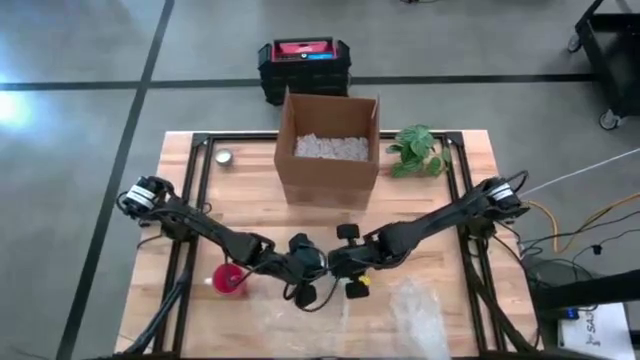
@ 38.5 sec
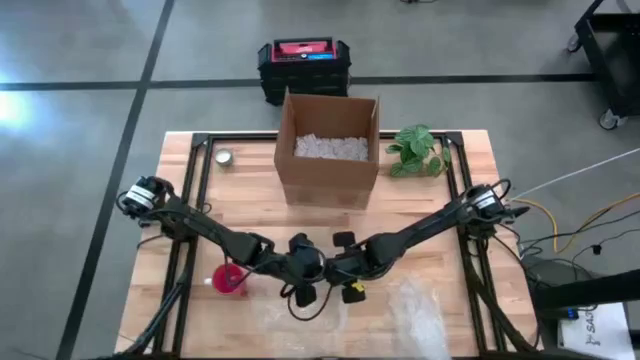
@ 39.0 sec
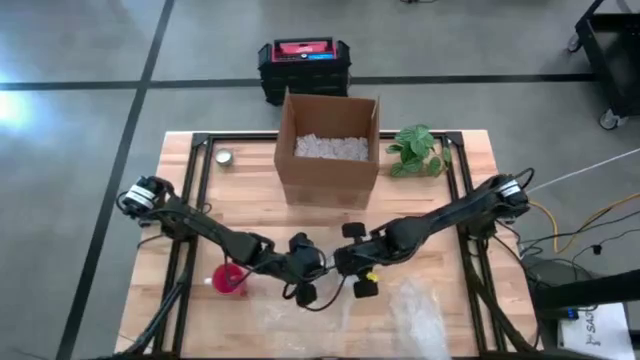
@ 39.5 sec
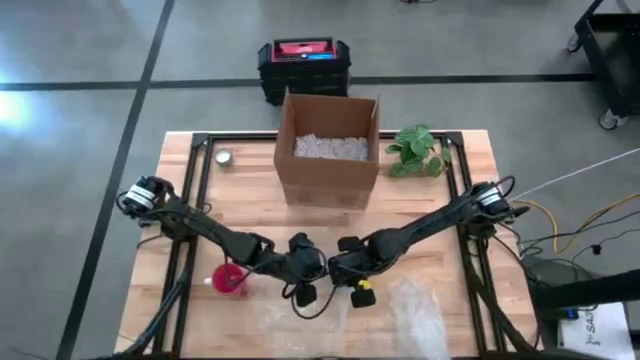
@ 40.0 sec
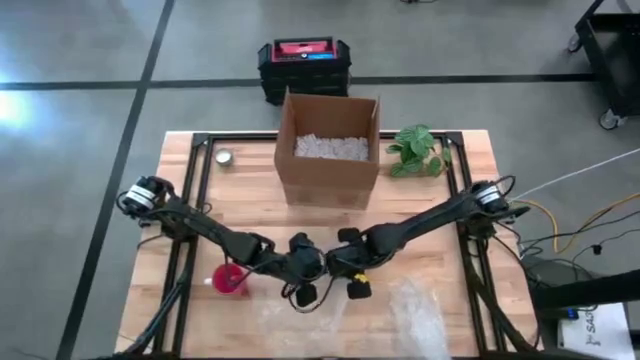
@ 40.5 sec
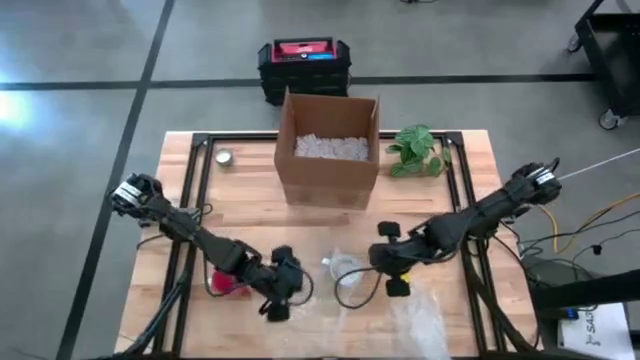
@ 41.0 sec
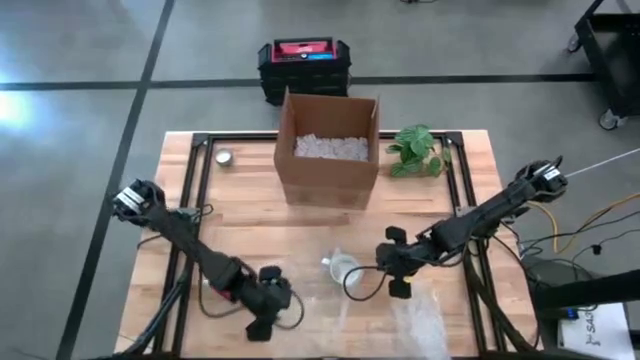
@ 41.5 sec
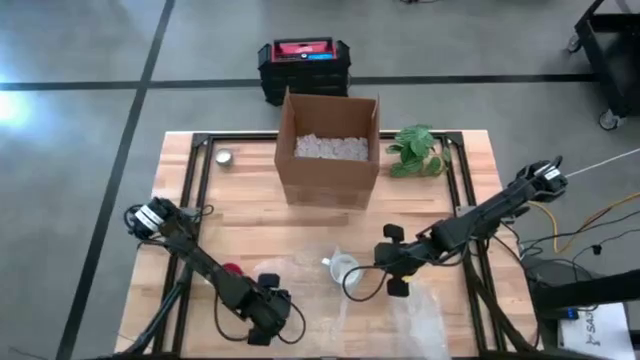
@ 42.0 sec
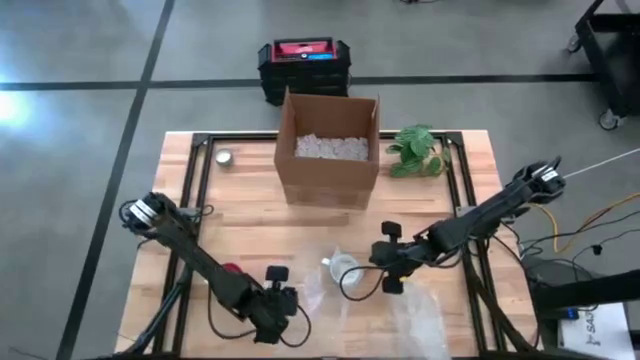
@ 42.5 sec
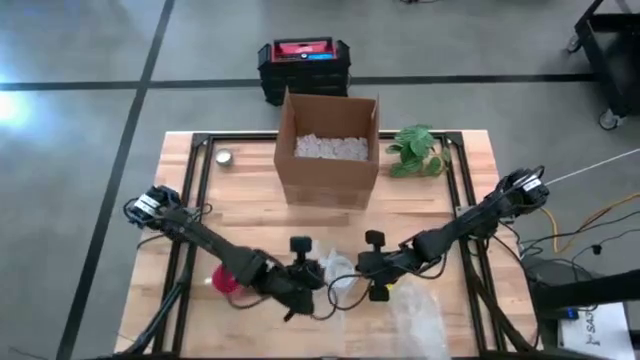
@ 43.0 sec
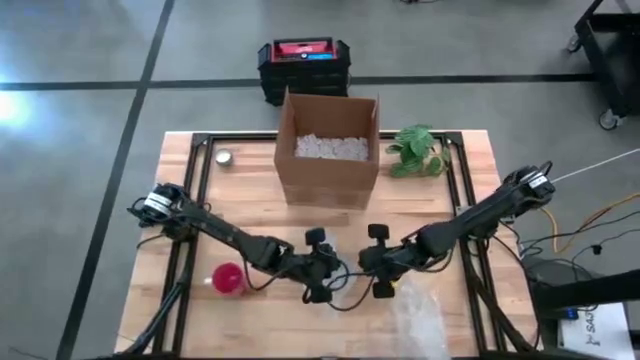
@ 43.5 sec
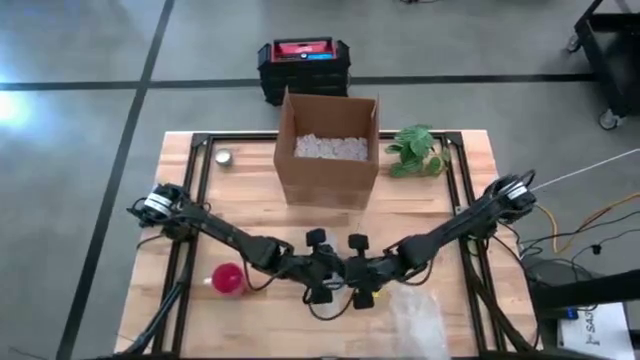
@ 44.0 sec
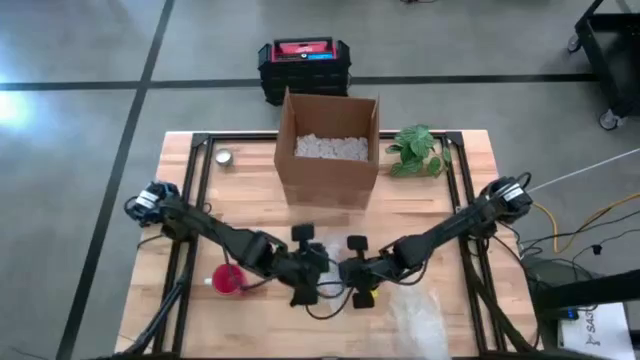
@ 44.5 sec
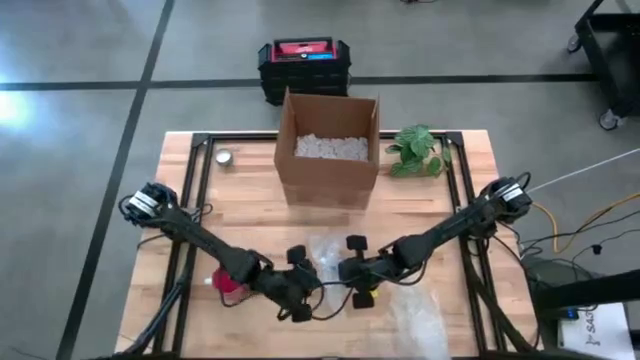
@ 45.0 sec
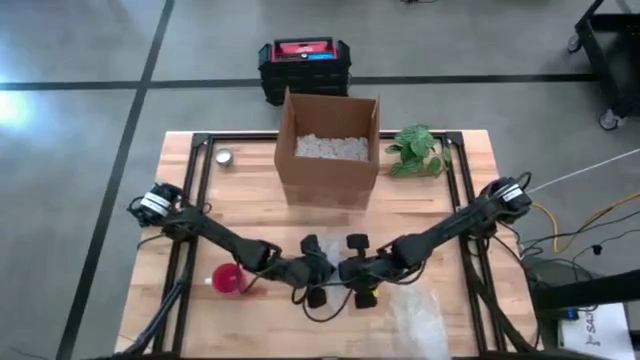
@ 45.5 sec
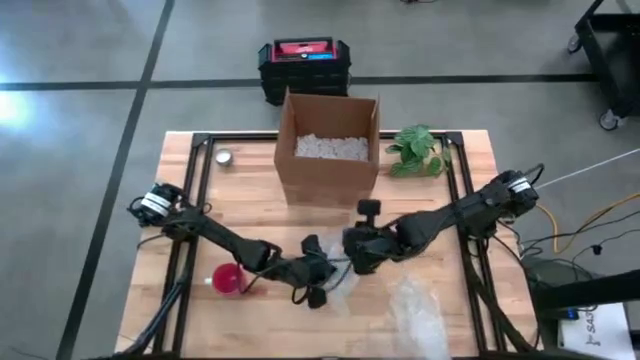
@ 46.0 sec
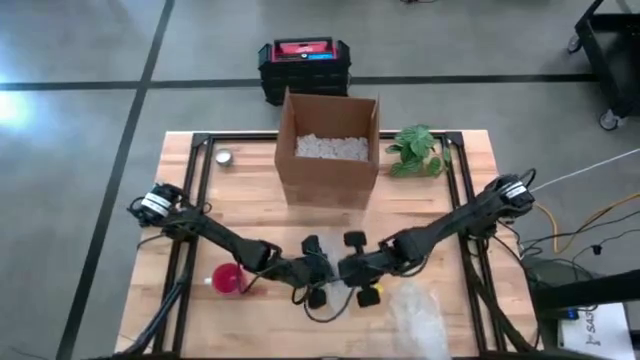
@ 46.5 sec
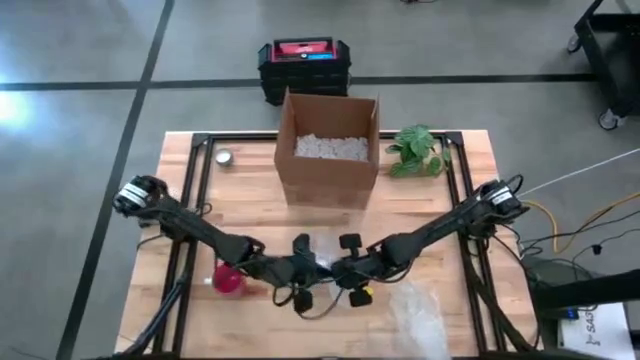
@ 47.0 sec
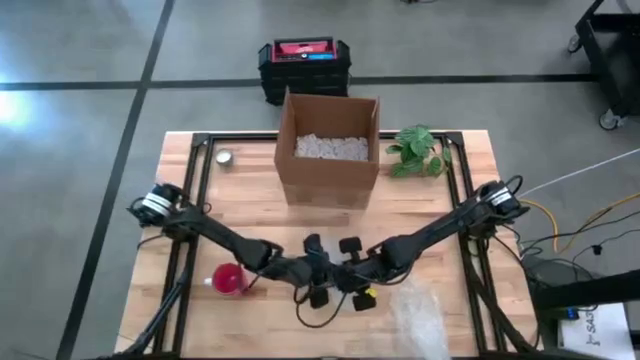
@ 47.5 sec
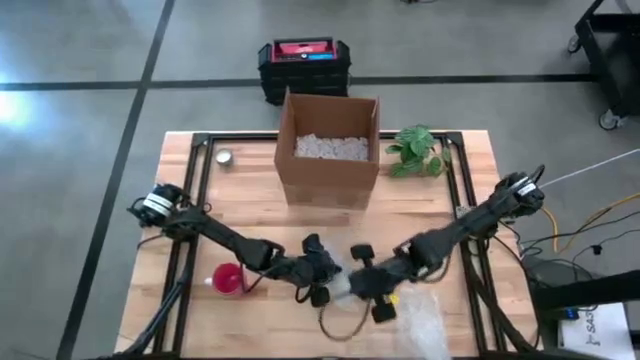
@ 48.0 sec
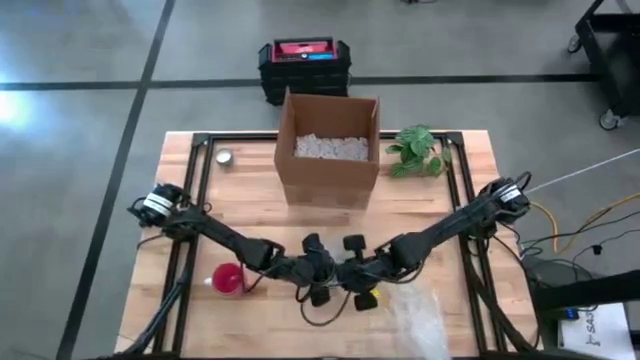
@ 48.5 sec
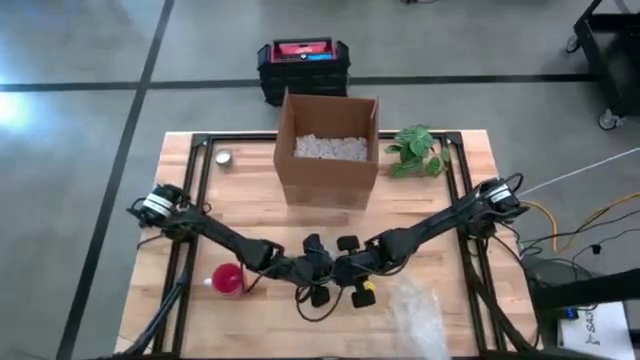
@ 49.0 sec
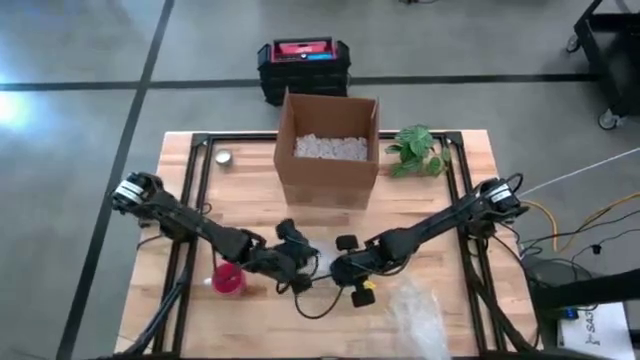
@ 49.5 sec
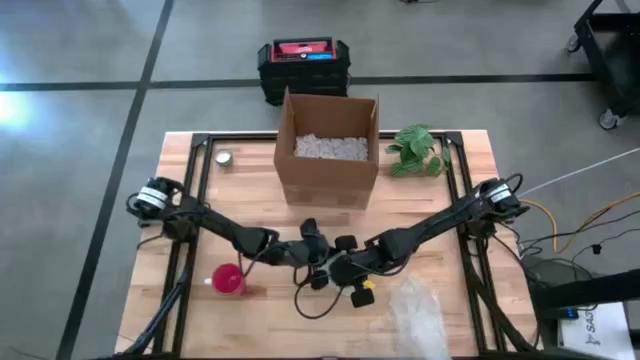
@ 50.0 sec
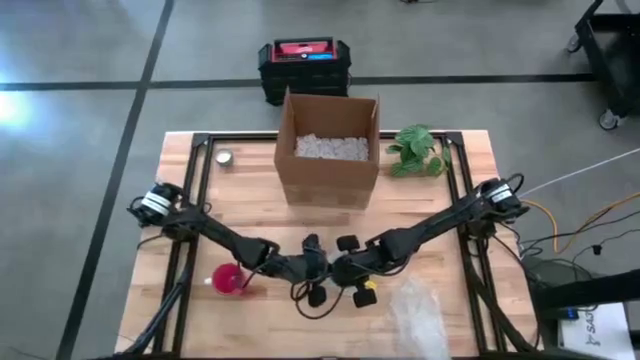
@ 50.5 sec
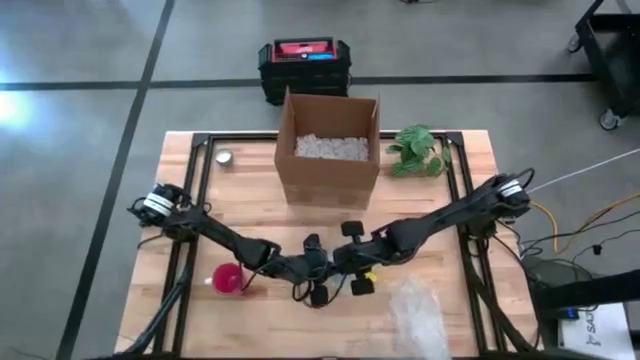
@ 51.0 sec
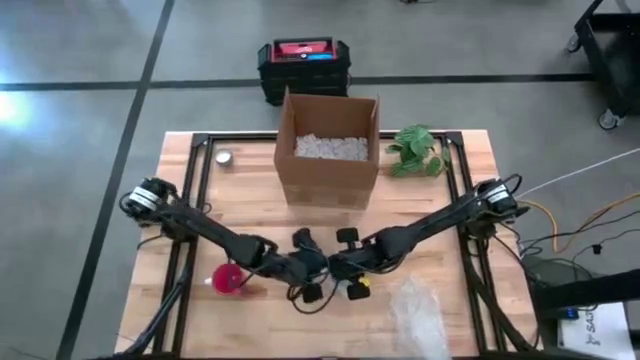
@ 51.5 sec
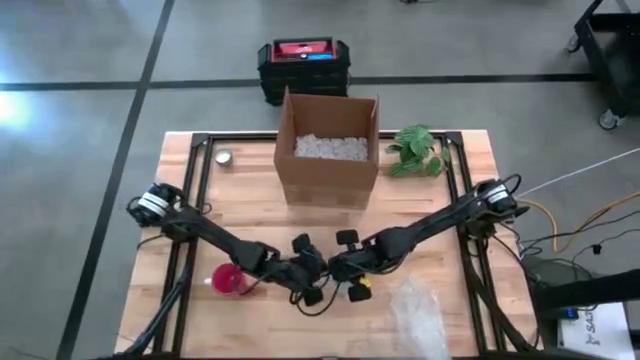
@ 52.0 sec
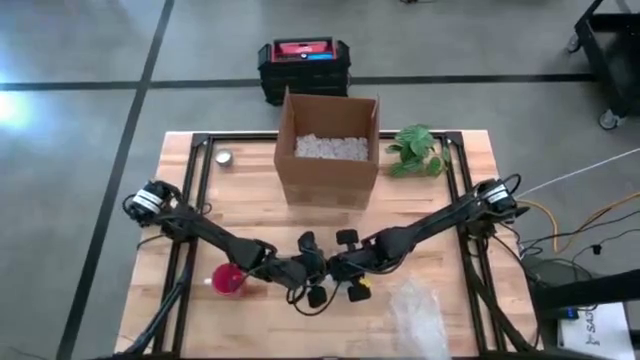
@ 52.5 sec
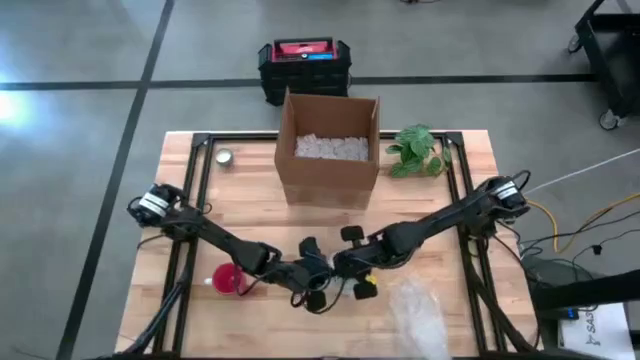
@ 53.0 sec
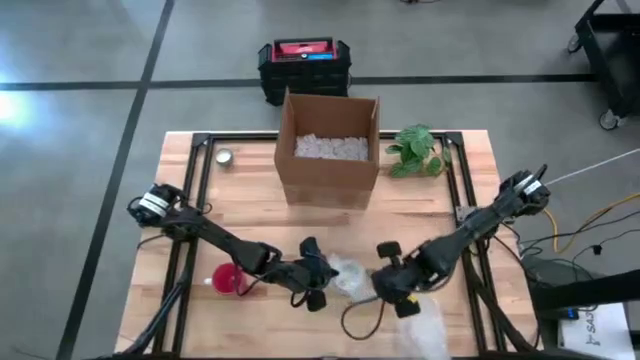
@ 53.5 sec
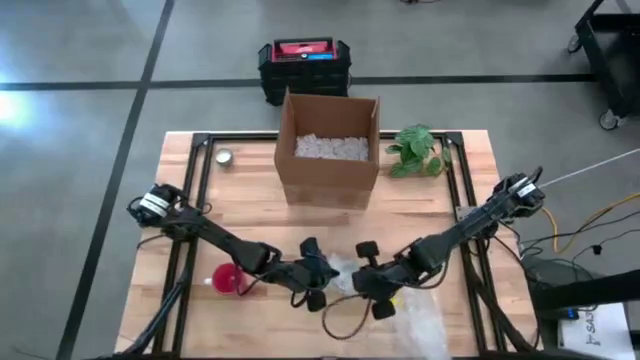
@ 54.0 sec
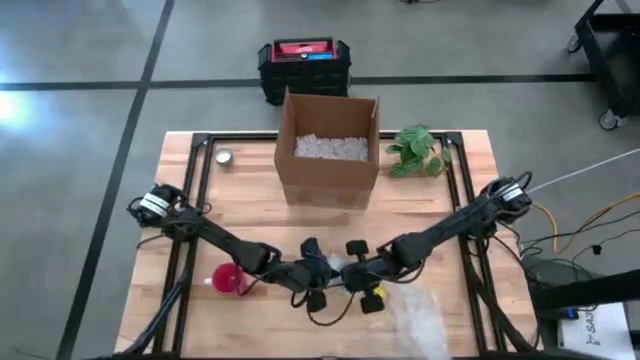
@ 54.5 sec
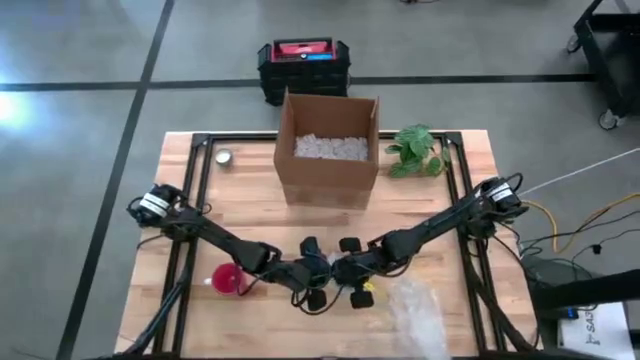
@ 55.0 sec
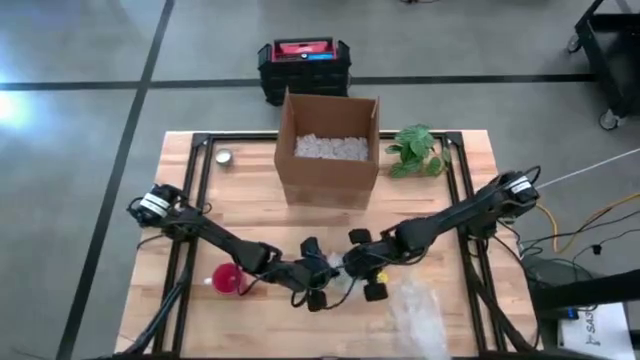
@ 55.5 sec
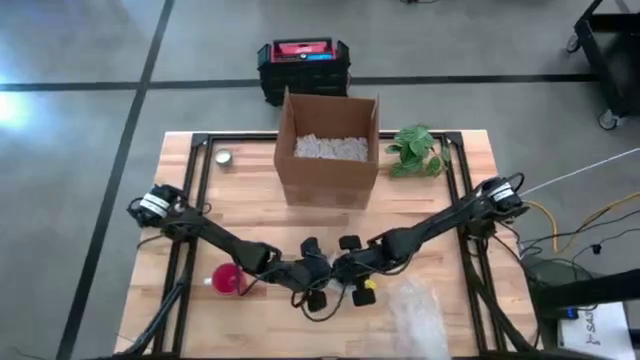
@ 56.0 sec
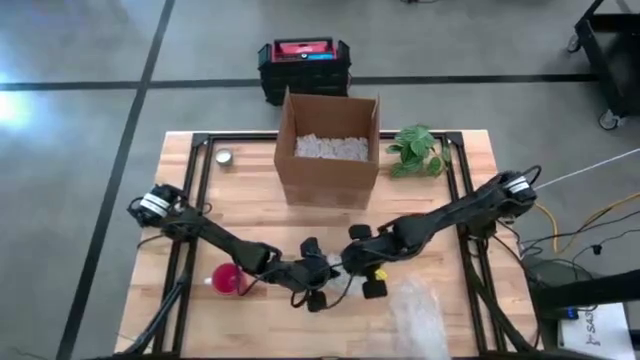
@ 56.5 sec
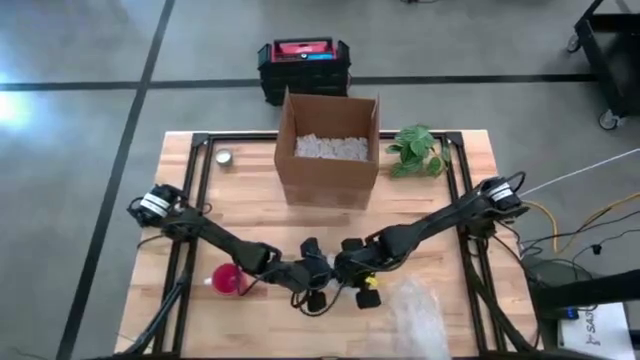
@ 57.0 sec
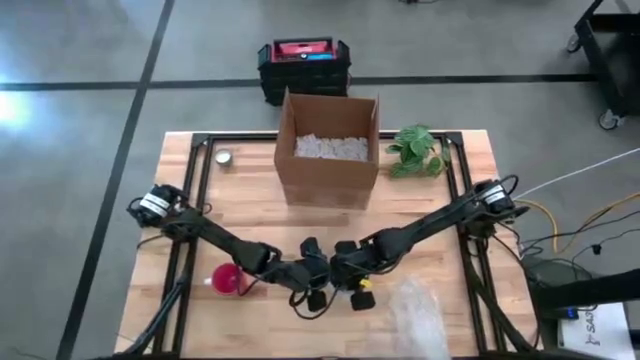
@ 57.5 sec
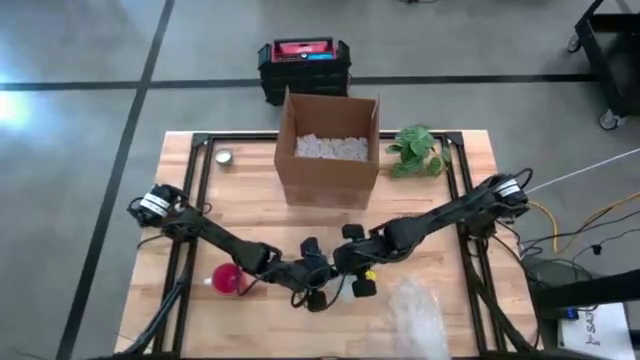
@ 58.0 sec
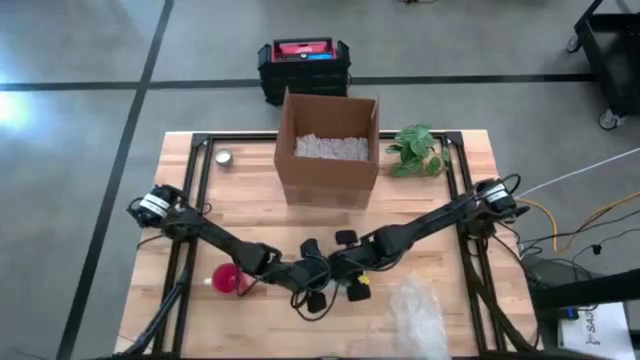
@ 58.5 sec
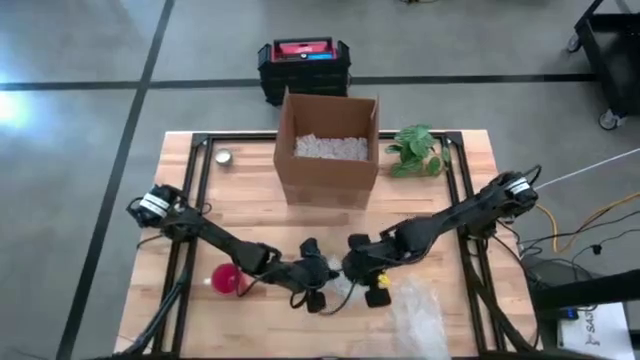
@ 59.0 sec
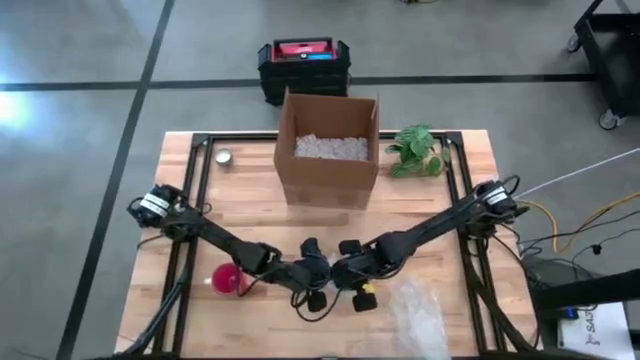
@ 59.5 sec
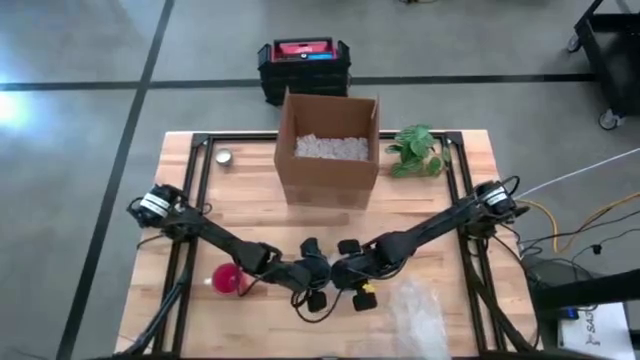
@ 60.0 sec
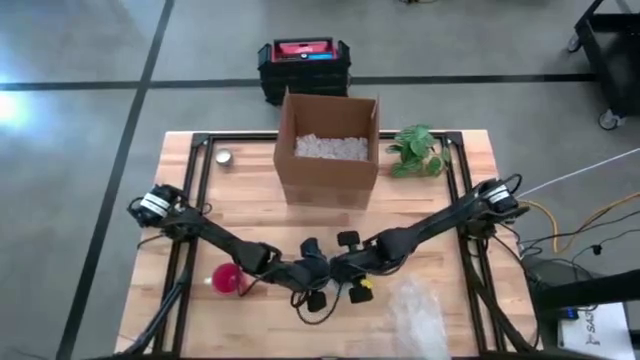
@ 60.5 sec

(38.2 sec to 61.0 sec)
Task: wrap mug
Wrap the white mug with bubble wrap
